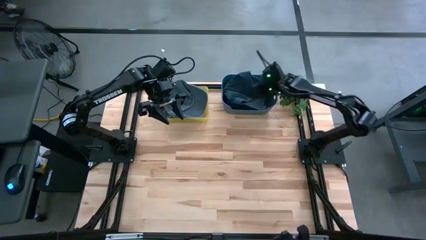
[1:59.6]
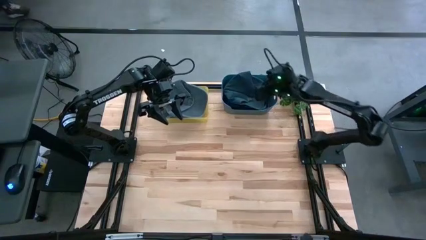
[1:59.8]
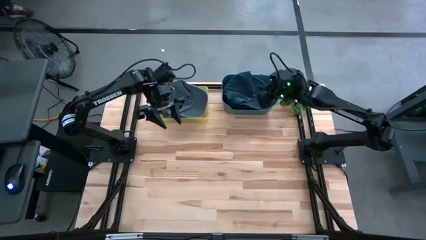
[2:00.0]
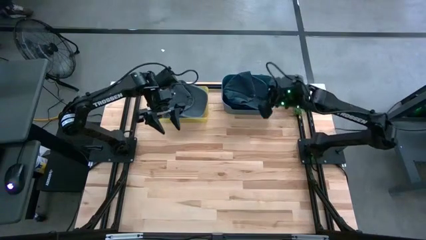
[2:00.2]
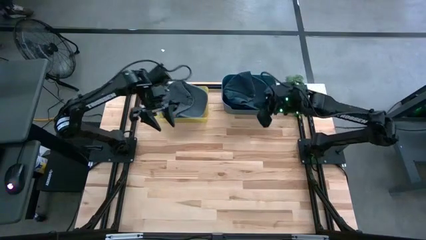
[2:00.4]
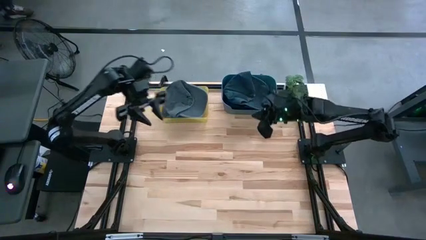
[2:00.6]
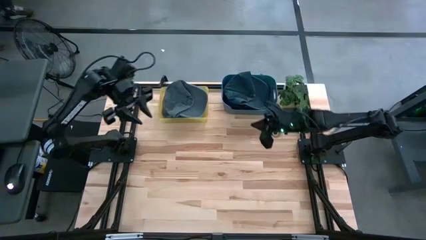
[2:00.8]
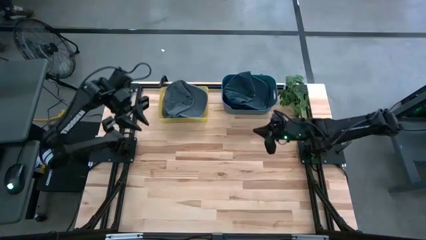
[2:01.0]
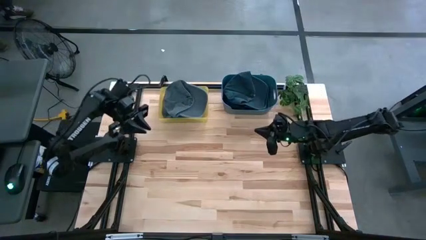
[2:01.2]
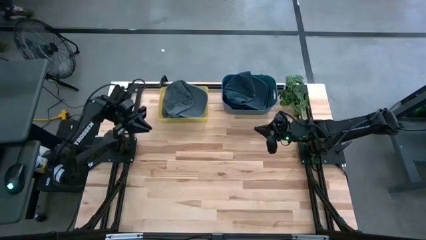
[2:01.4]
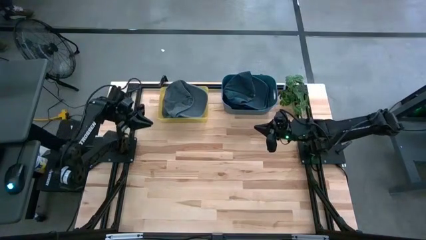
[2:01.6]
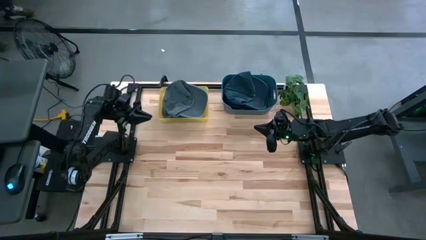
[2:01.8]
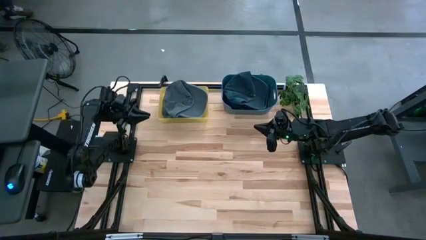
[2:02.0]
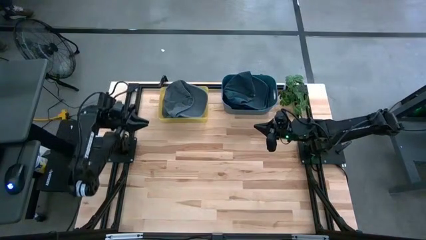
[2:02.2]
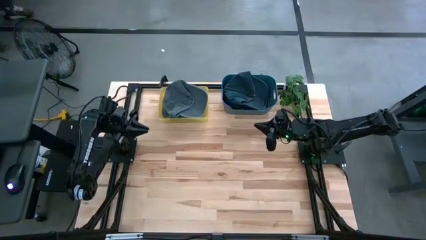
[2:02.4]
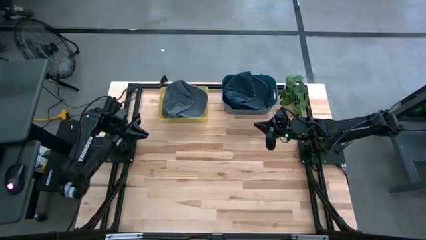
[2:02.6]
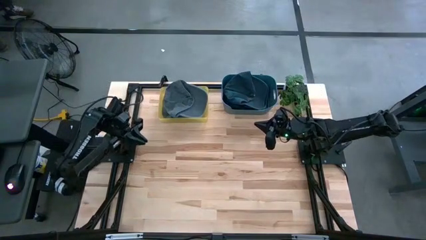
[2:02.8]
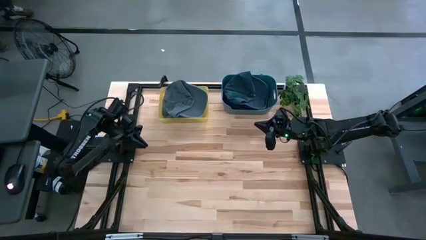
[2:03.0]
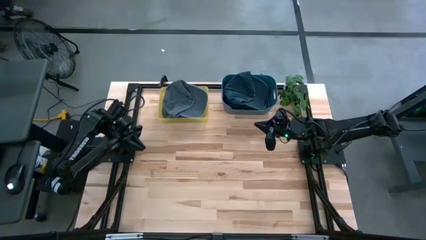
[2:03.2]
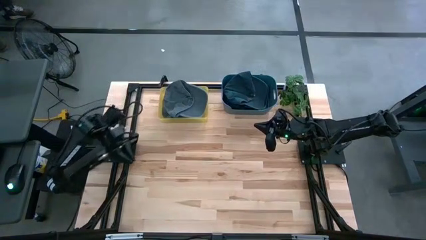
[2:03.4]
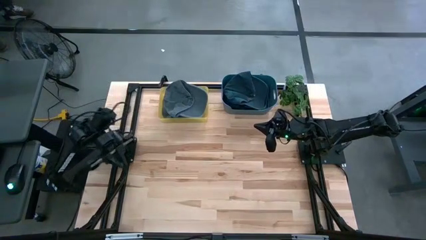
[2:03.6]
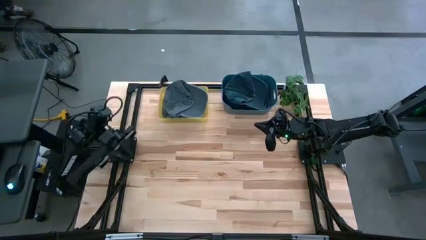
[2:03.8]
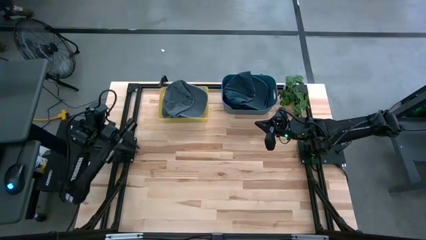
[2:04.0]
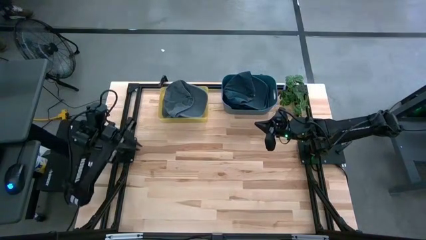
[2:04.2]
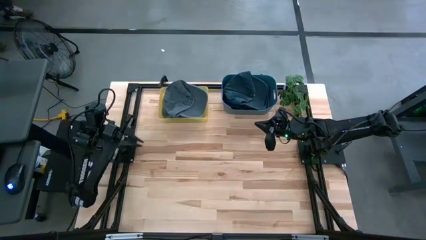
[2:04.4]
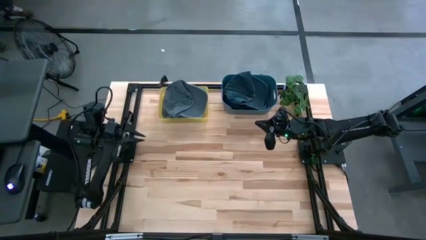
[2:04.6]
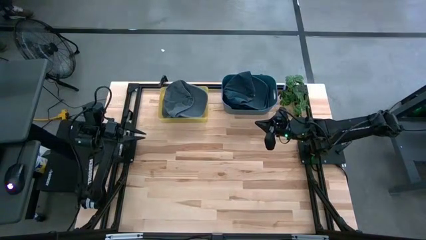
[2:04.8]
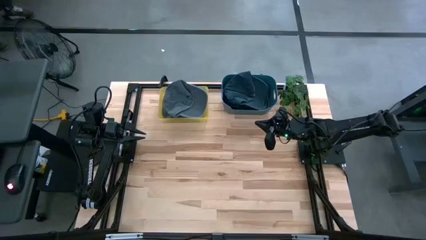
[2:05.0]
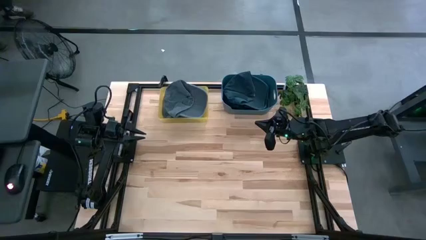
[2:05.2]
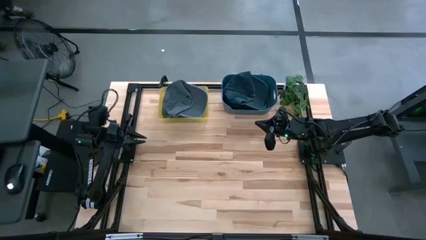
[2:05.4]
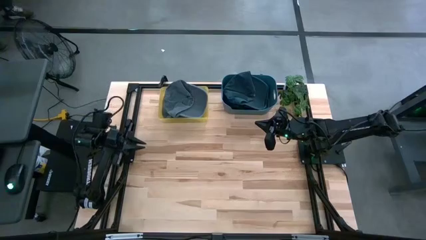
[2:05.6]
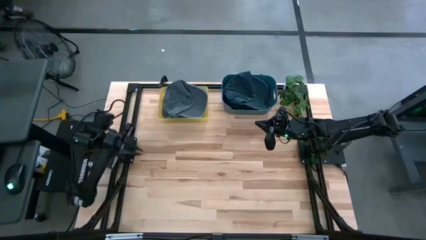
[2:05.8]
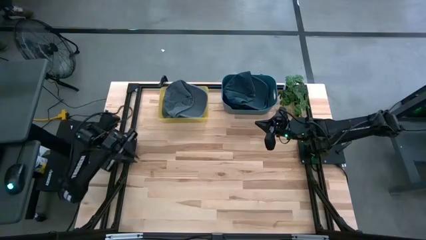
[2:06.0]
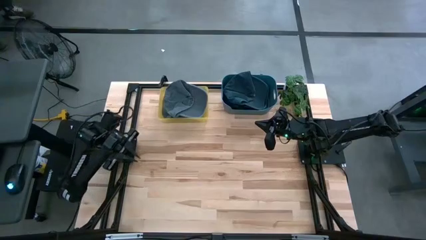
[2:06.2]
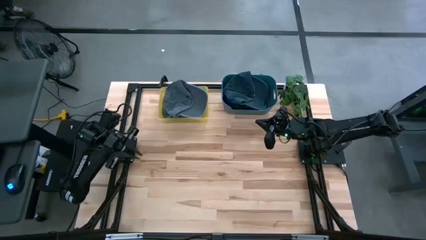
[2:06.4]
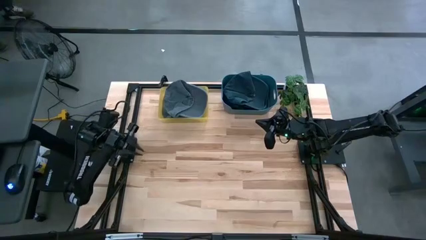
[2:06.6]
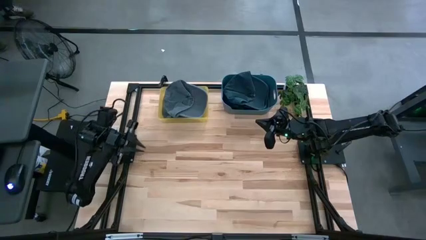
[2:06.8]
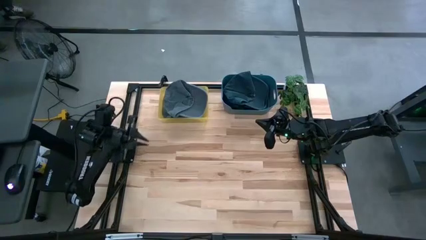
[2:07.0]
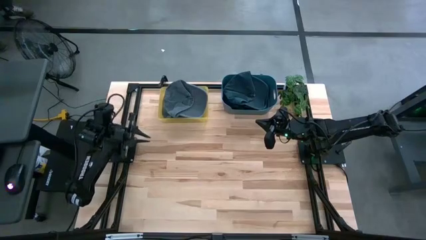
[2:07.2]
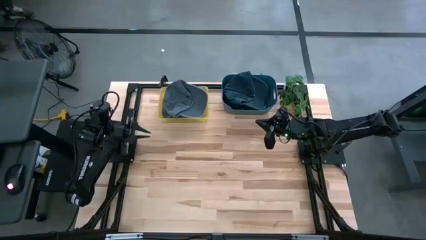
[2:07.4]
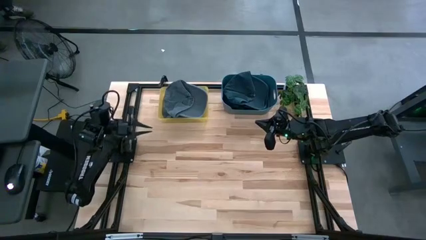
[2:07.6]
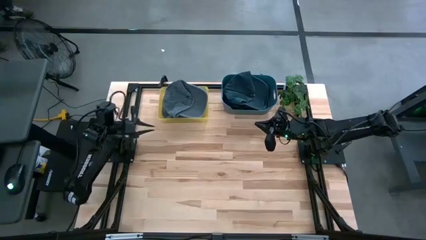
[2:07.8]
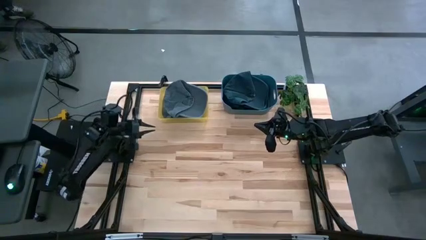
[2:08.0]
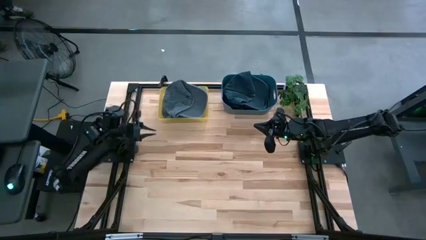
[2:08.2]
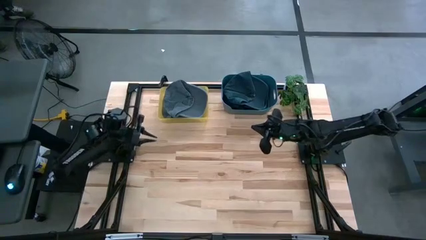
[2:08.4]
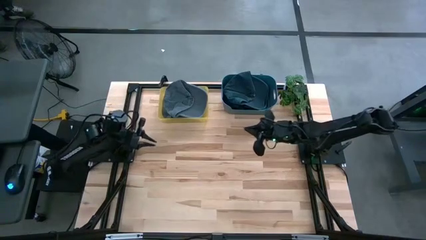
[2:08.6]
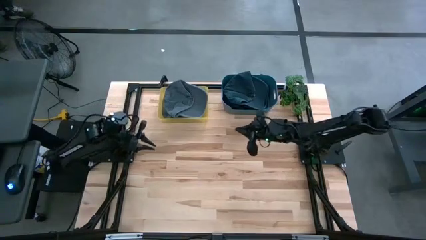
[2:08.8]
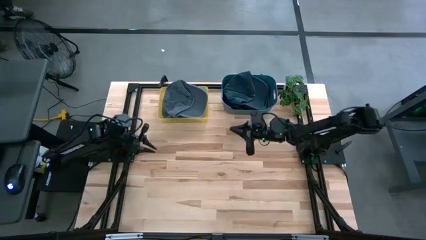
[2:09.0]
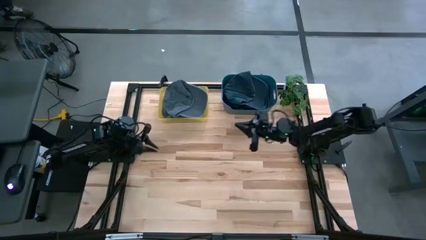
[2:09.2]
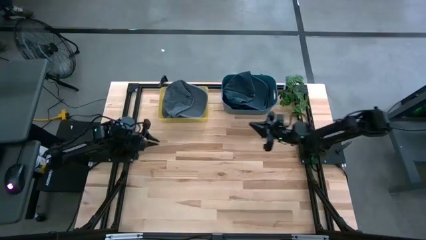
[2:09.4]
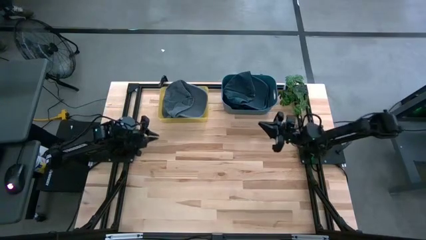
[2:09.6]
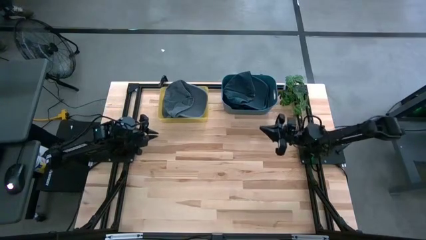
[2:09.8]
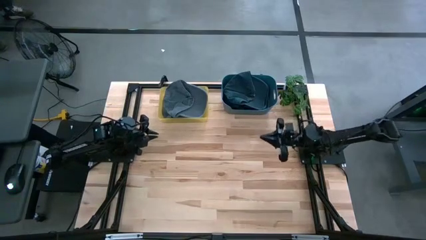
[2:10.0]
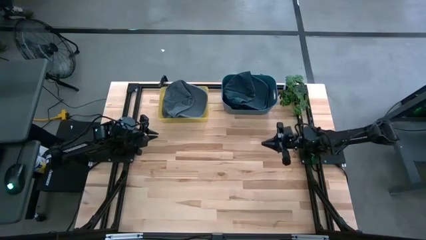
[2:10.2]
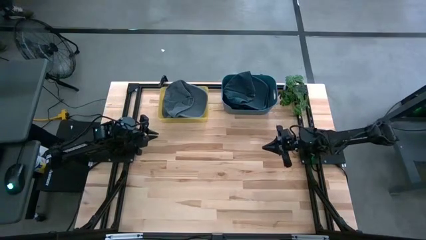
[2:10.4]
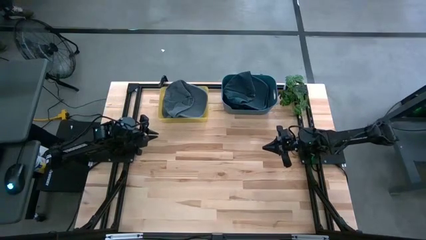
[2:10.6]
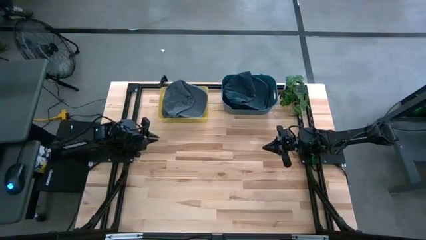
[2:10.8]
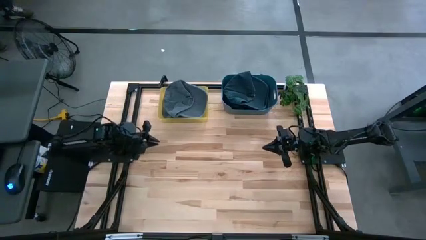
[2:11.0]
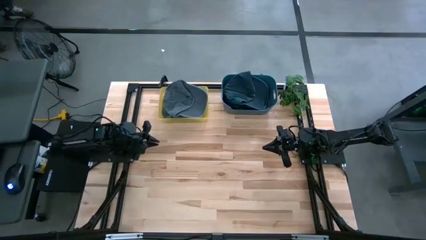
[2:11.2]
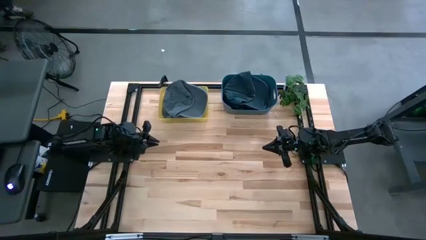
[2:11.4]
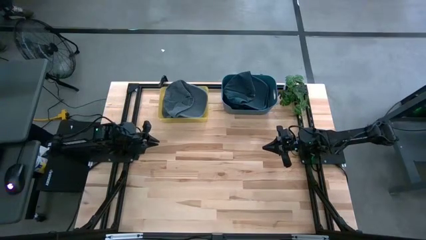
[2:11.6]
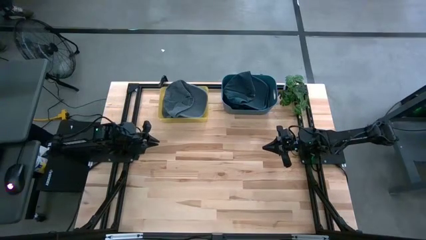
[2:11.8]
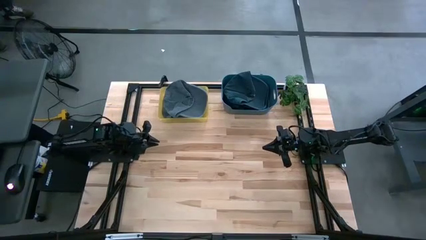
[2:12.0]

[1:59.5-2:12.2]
Task: Pick & Place hat
Return to home position

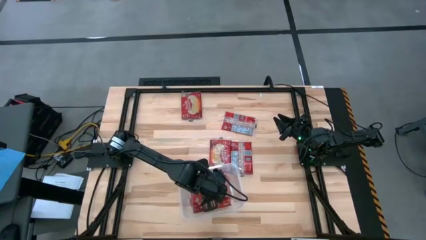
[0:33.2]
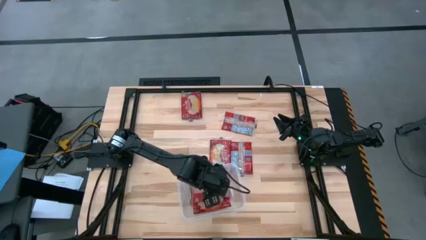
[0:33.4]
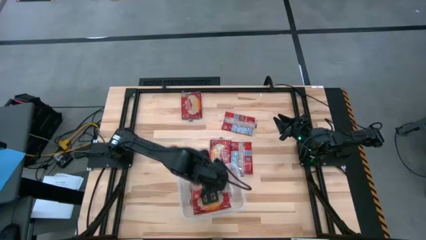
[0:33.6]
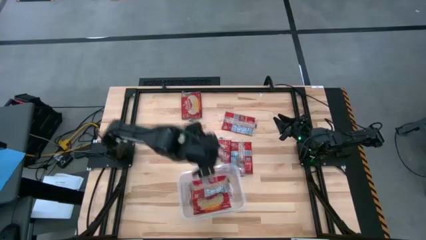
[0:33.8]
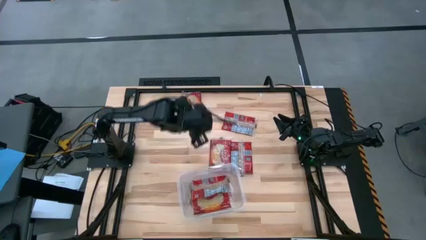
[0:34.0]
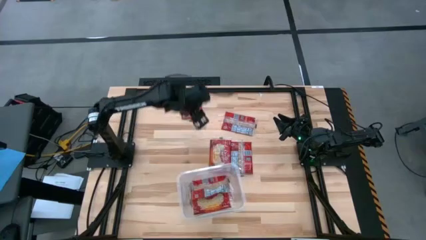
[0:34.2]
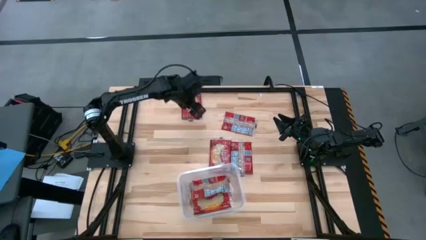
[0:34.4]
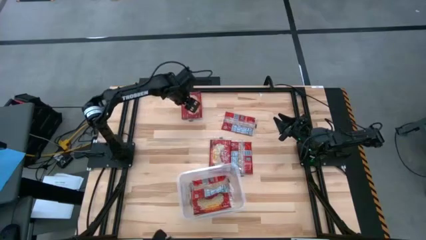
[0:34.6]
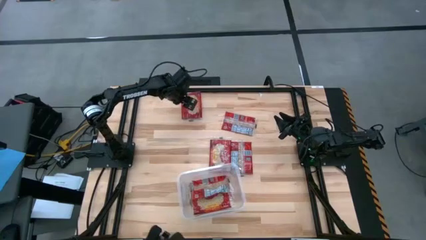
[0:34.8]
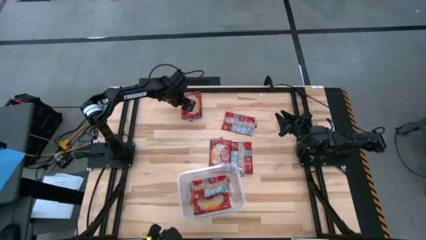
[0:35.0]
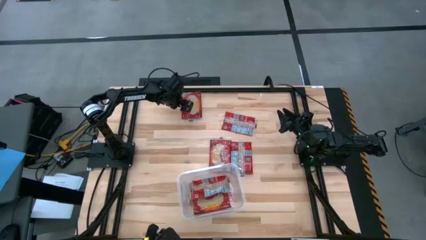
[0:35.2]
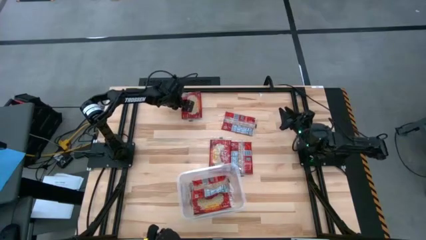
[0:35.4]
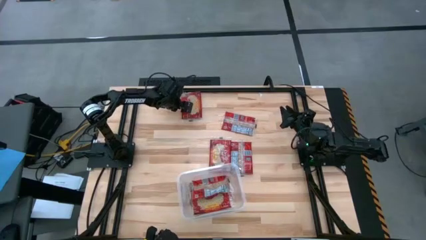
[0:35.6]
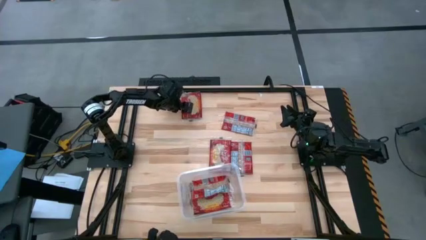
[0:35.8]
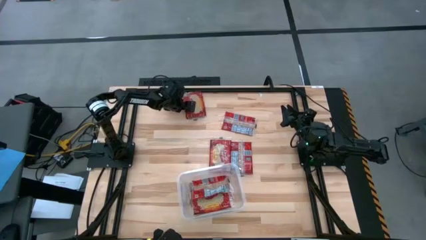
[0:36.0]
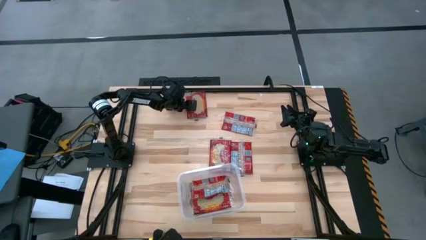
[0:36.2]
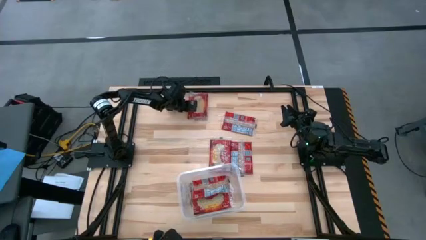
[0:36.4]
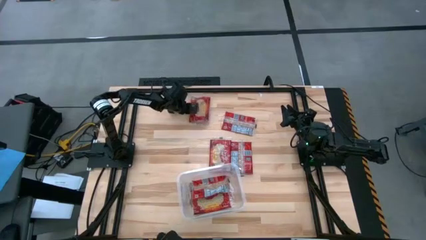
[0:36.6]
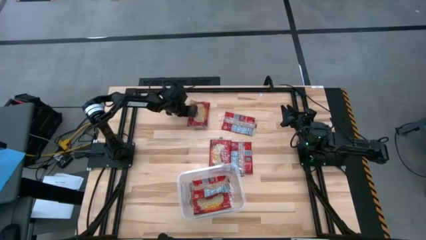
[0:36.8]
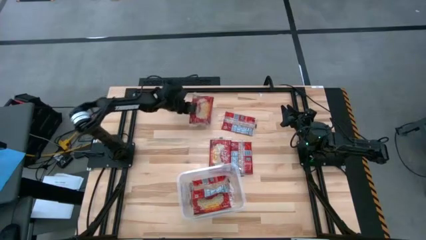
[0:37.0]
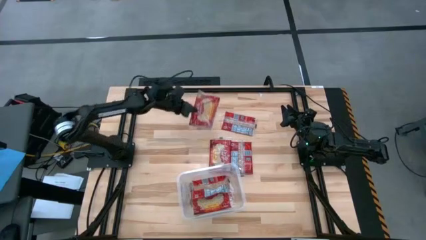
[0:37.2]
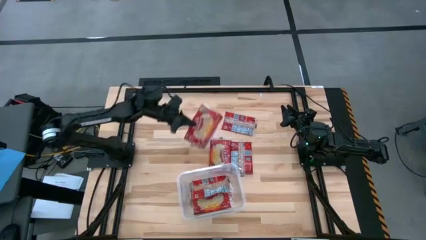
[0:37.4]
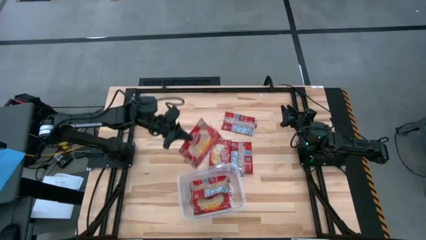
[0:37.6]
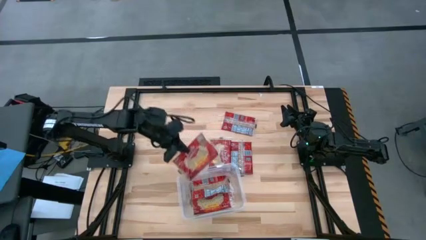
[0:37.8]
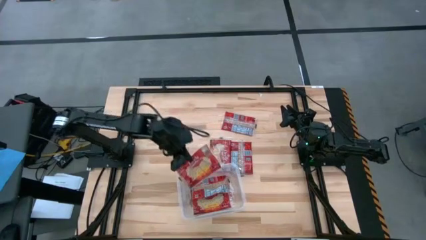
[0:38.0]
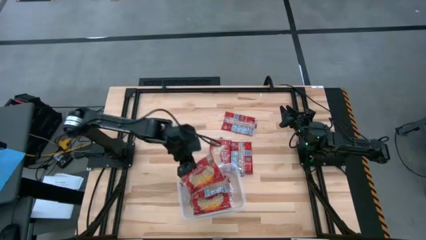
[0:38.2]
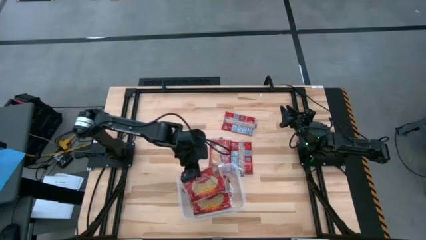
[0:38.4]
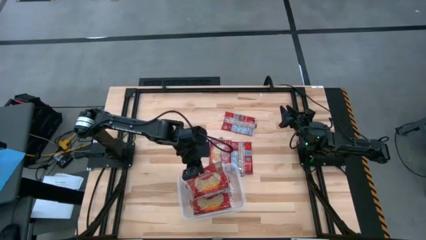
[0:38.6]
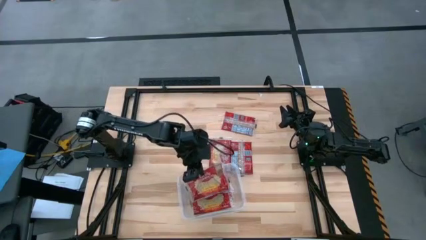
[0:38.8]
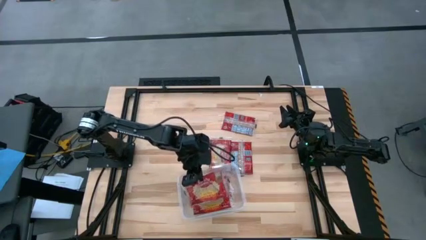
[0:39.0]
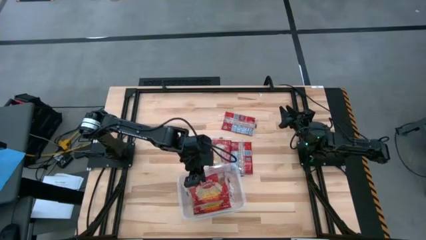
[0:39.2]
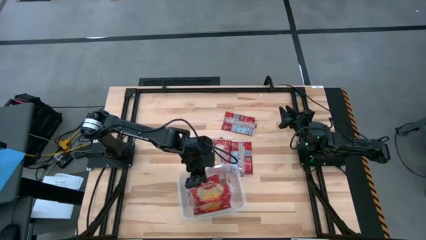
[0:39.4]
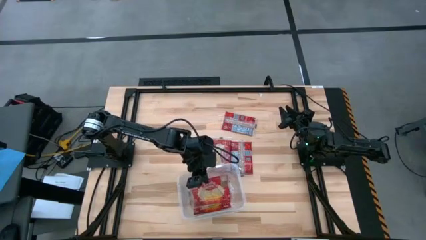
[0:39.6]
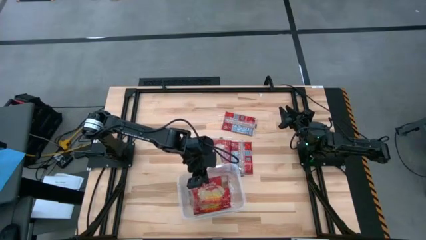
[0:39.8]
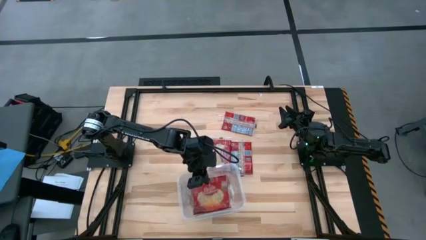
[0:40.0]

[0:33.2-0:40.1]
Task: Sort popcorn bags into baskets
Put the red popcorn bag into the transparent container
